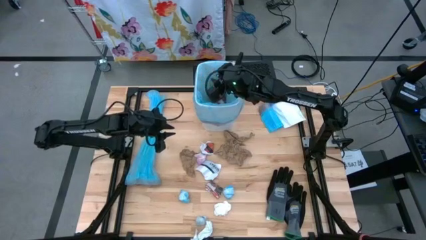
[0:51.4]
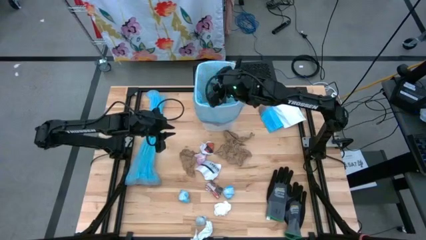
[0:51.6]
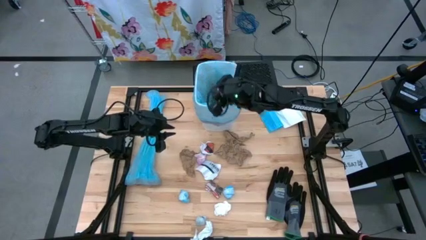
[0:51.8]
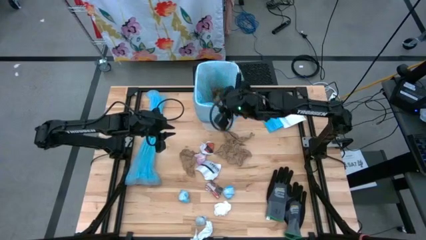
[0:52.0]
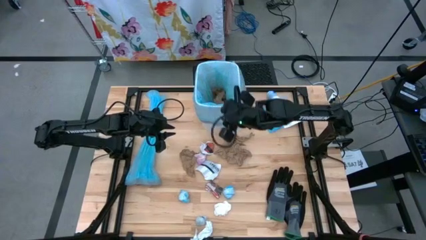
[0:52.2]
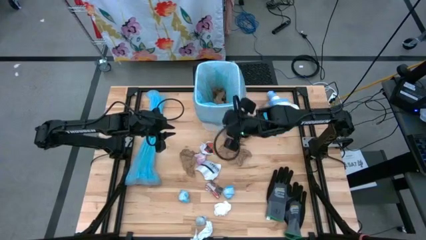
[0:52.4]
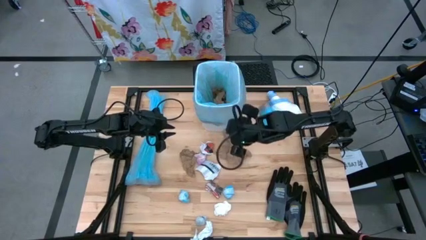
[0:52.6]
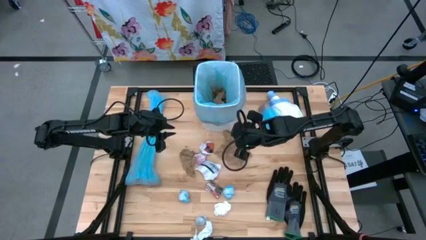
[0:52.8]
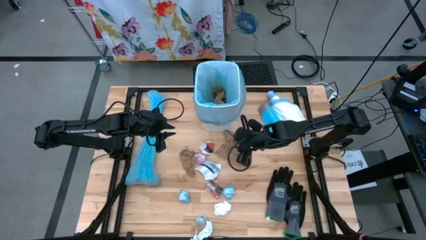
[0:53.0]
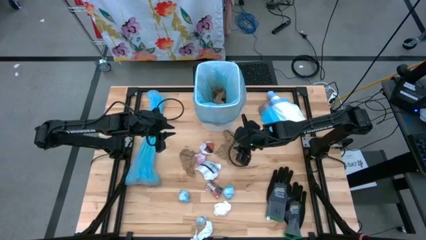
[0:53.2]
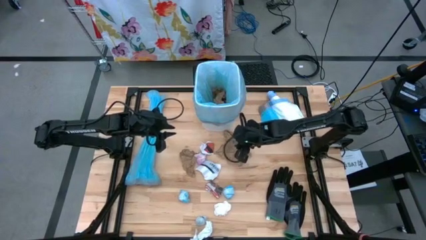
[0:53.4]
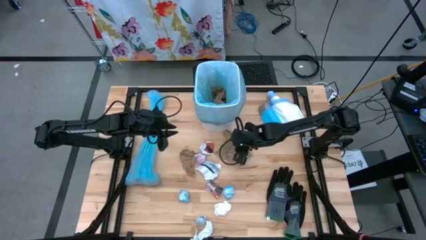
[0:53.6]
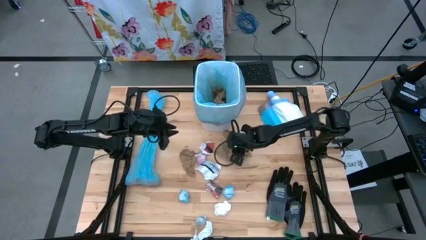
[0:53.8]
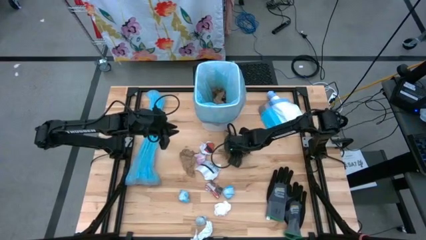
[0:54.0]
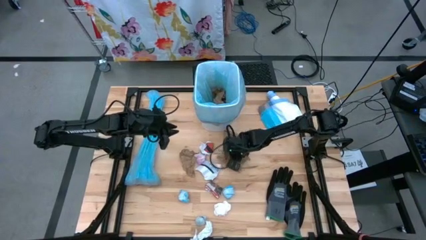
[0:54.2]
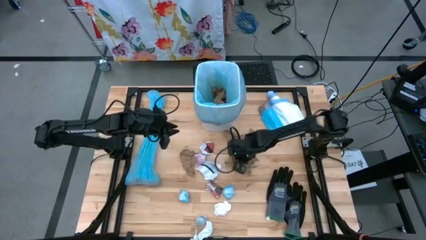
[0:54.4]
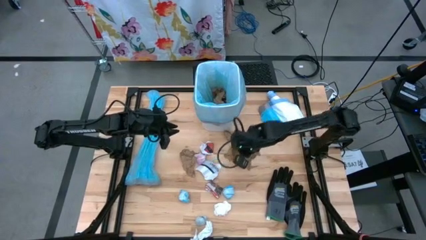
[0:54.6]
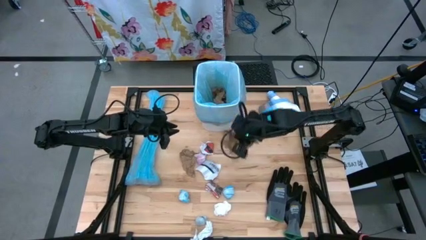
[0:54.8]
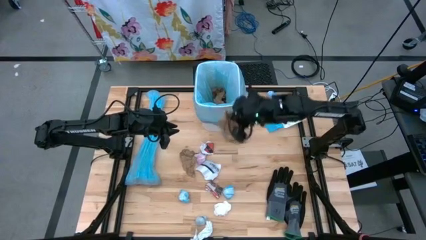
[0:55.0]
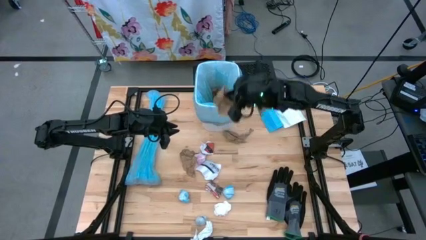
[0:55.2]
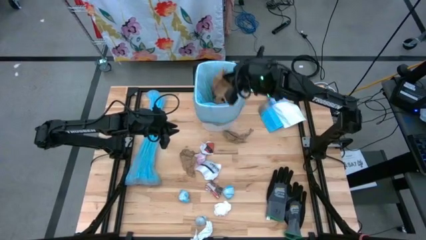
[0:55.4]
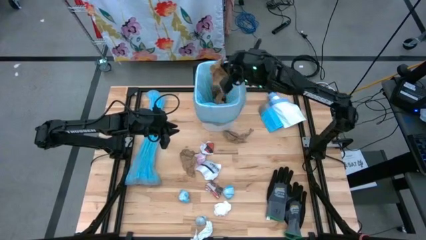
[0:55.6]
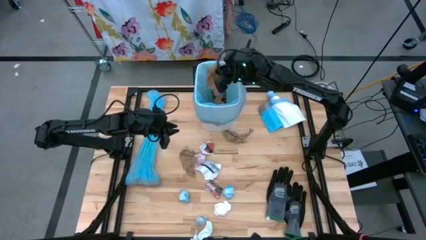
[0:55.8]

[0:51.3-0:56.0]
Task: place trash/remove bag and relplace
Put the brown paper into the blue trash bag inside the white trash bin

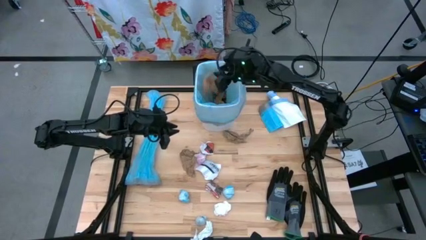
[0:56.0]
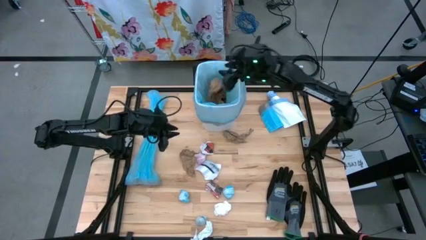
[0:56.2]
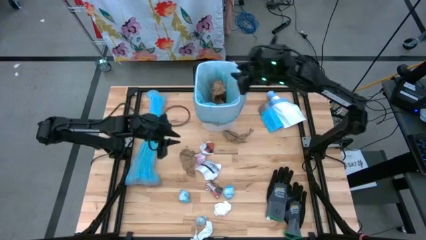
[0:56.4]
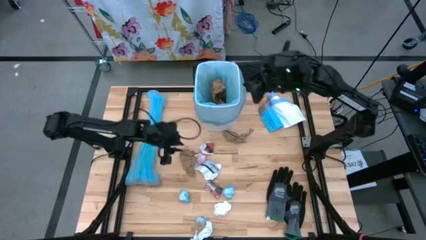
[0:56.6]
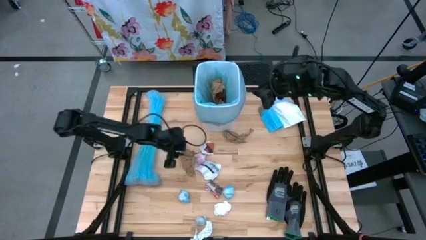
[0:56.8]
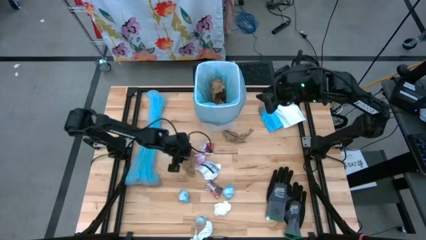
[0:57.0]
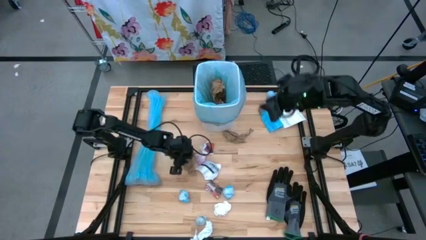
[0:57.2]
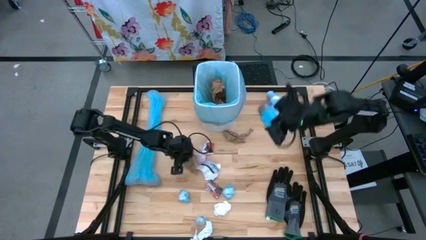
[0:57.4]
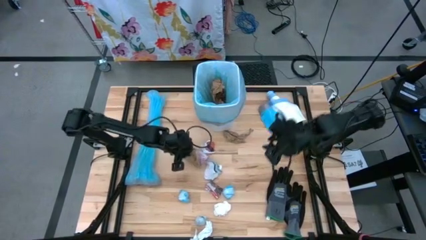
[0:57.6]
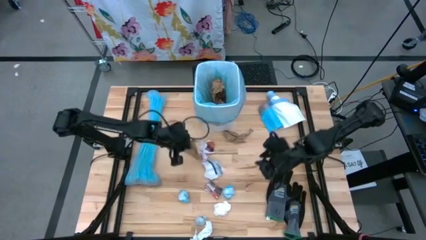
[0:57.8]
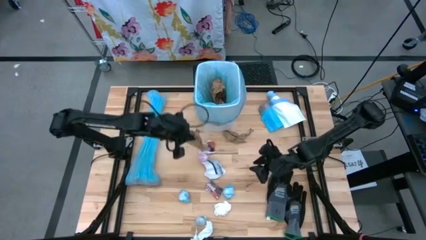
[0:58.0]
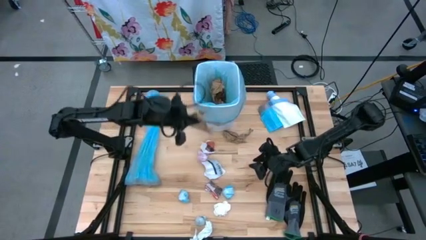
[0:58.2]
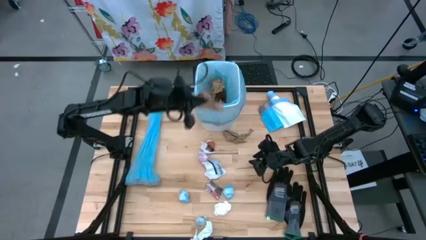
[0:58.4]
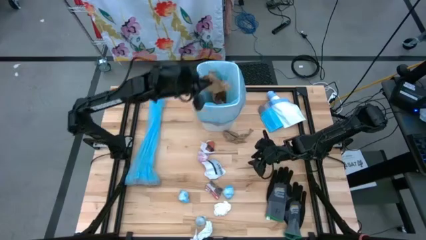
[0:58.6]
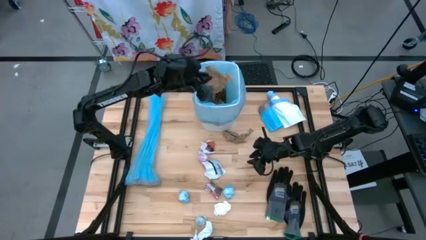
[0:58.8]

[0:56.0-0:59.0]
Put the brown paper into the blue trash bag inside the white trash bin

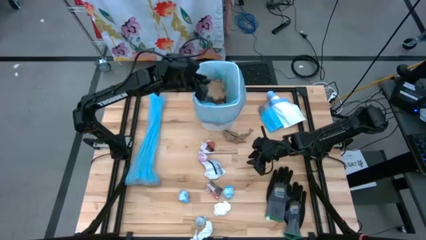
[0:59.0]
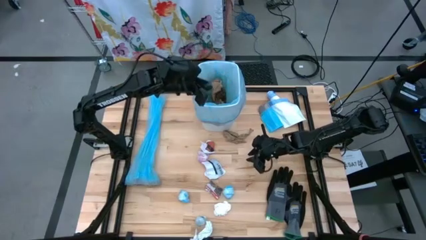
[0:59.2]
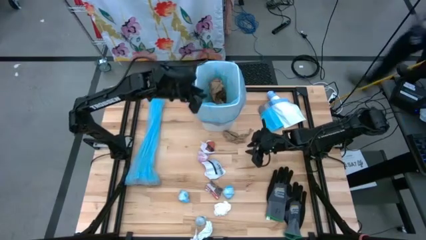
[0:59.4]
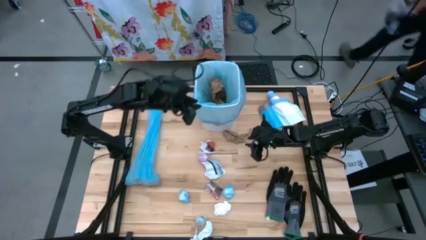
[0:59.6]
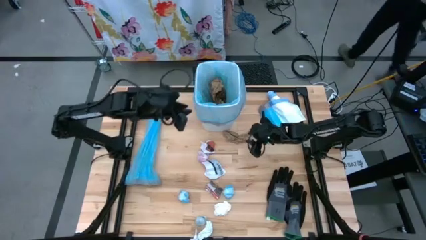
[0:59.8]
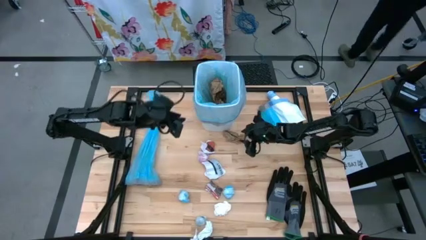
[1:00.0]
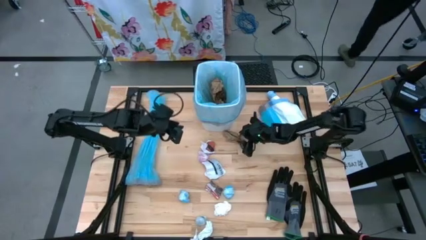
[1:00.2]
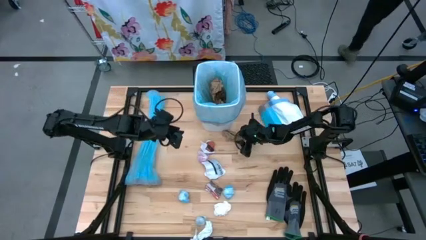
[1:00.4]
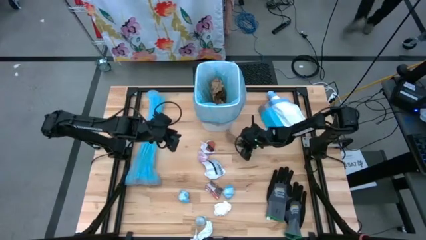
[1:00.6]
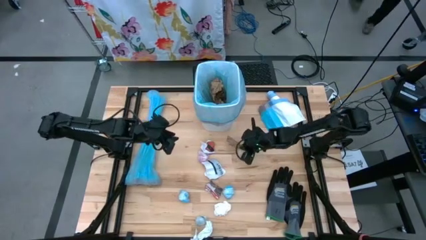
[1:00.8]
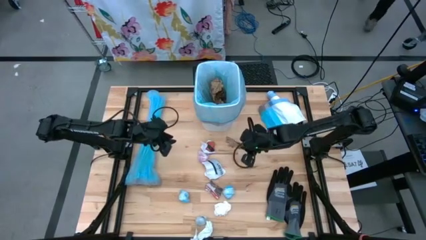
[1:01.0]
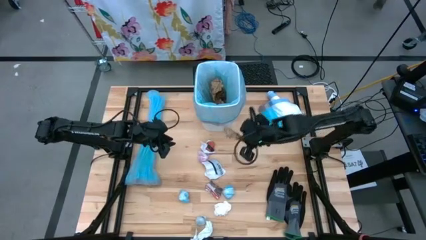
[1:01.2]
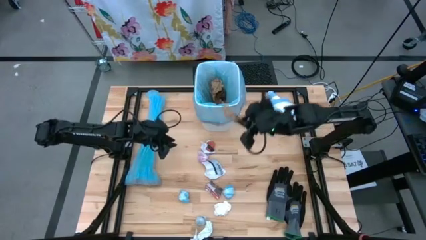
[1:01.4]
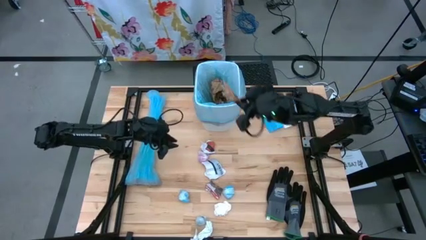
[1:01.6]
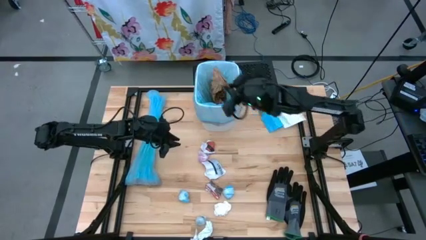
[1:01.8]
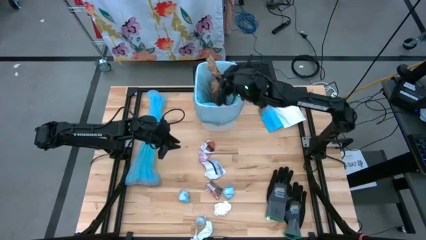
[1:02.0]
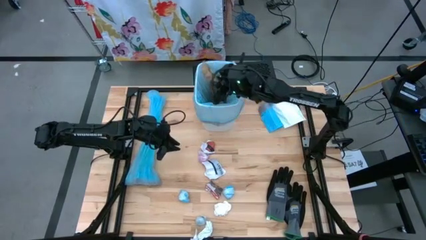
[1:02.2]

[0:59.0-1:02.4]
Put the brown paper into the blue trash bag inside the white trash bin

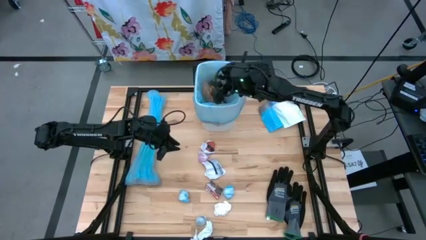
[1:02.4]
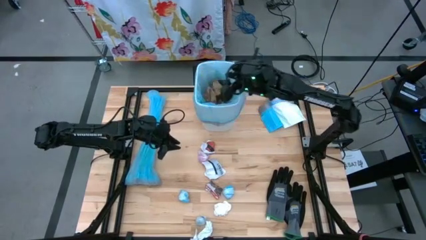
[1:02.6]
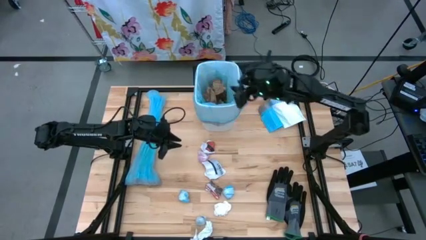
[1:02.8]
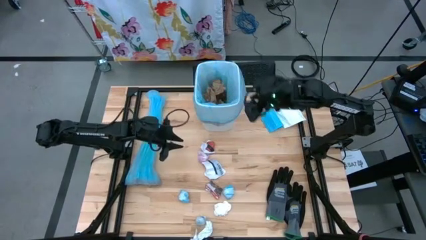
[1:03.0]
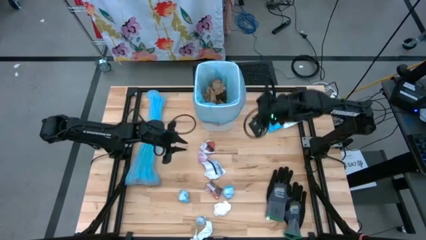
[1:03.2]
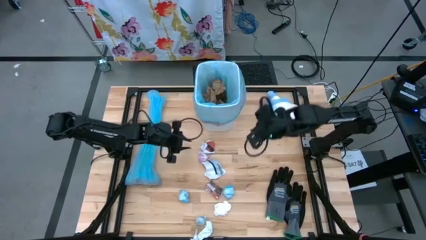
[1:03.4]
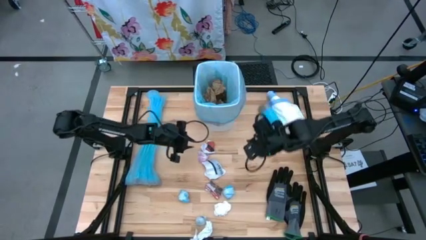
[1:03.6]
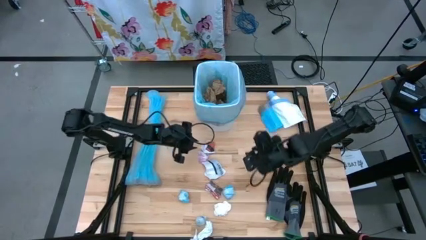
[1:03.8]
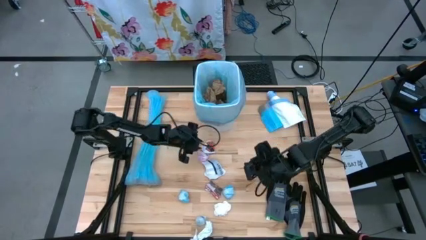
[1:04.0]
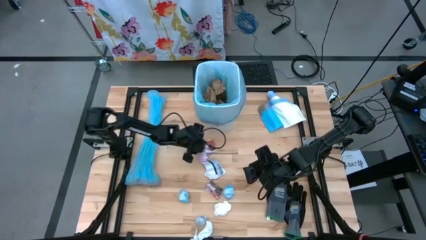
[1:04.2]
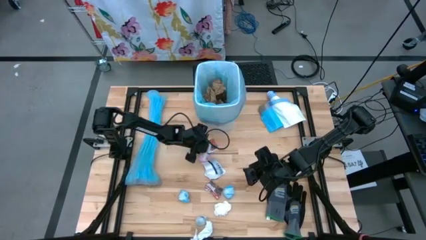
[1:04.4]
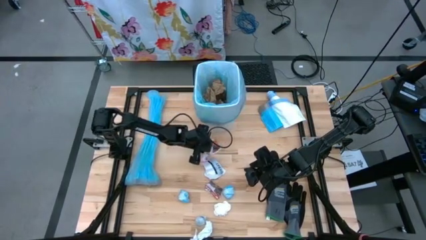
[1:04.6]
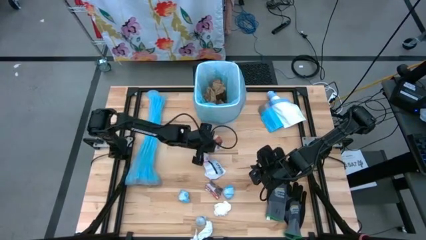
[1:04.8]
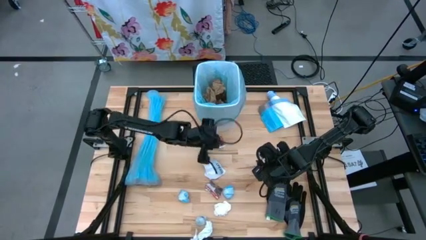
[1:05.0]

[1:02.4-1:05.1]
Put the orange paper into the blue trash bag inside the white trash bin

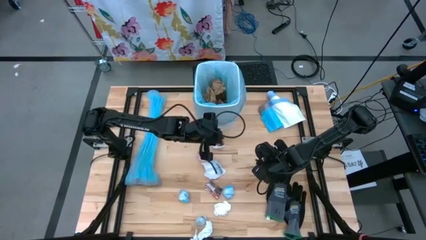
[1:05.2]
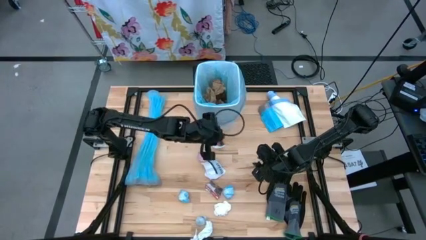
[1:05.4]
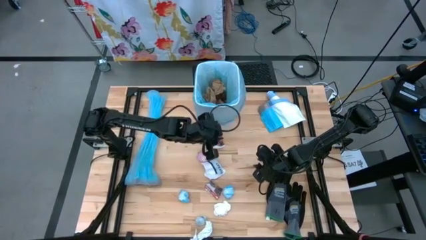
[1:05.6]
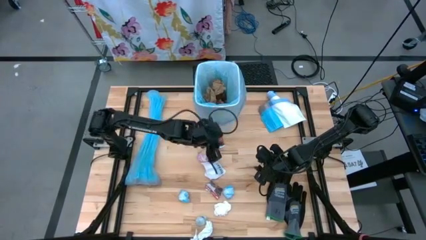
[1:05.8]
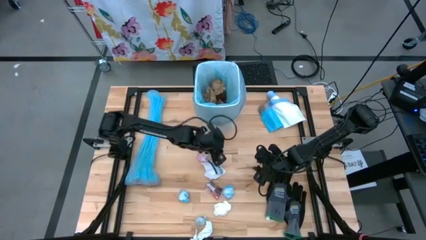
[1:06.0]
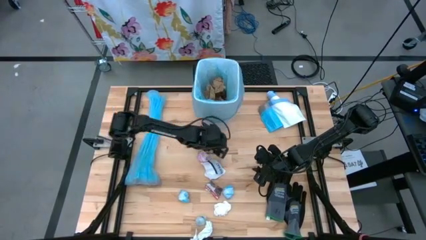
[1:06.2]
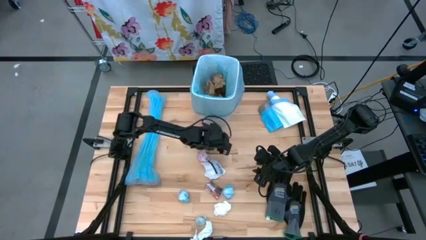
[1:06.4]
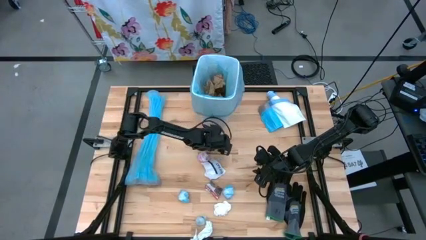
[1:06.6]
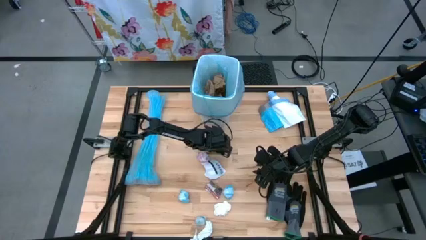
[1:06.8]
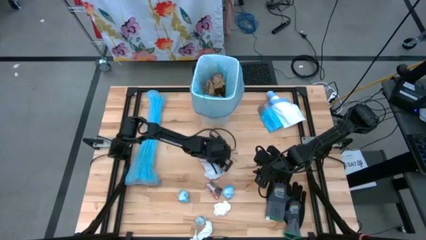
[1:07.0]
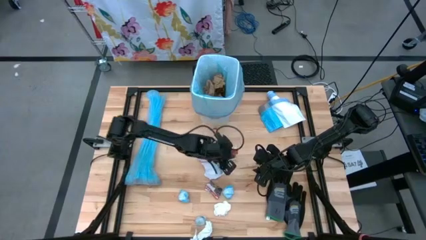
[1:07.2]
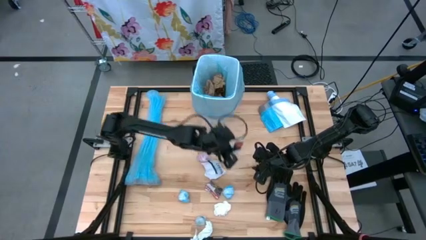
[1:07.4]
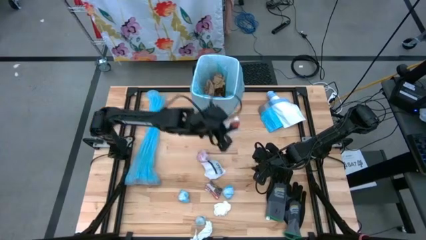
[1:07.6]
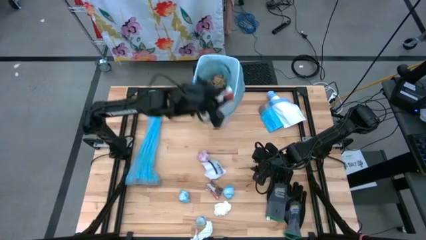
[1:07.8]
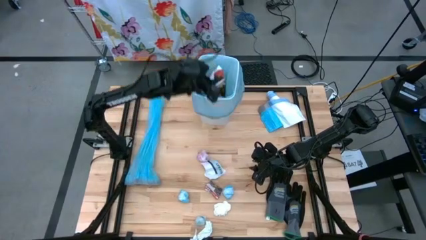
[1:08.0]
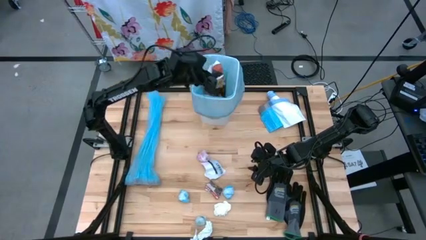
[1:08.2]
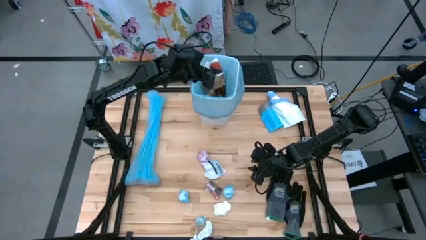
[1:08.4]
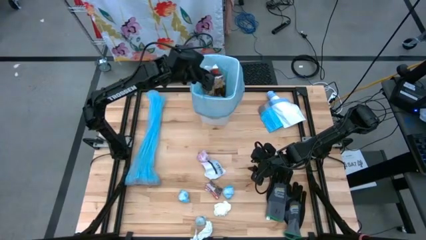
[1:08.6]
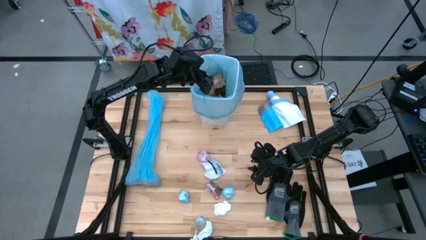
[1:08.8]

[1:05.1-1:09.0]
Put the orange paper into the blue trash bag inside the white trash bin
